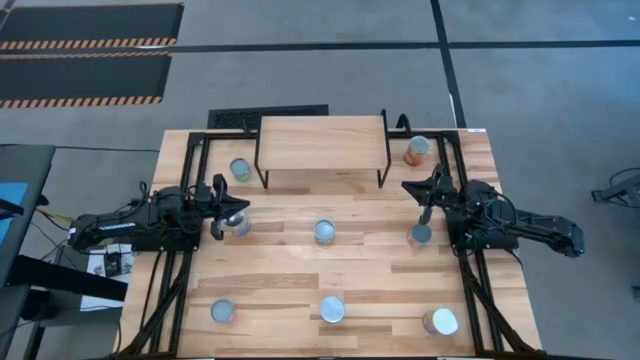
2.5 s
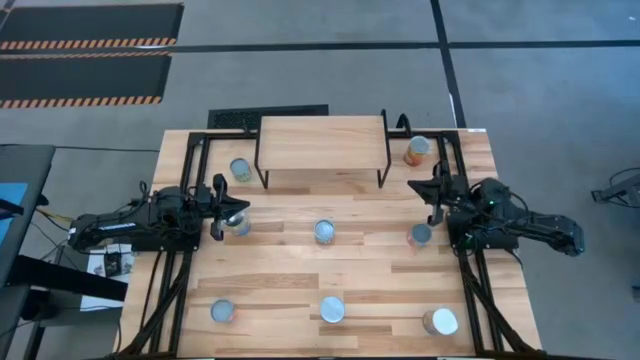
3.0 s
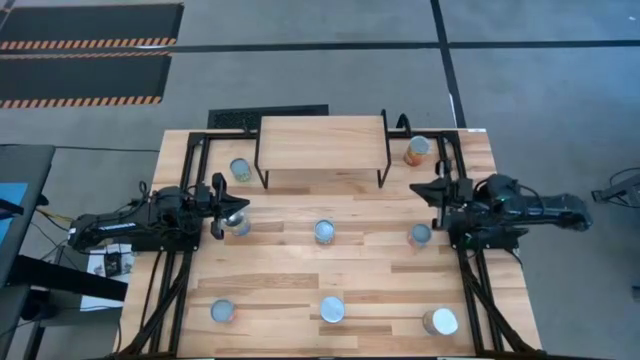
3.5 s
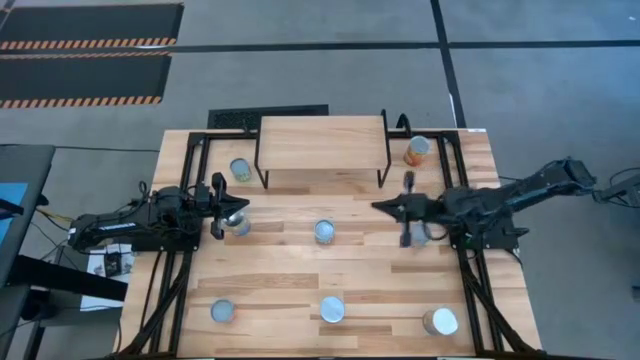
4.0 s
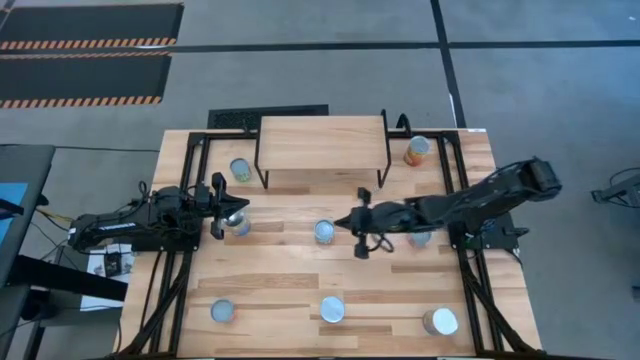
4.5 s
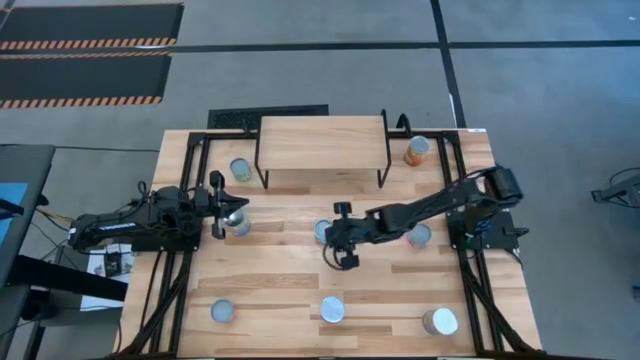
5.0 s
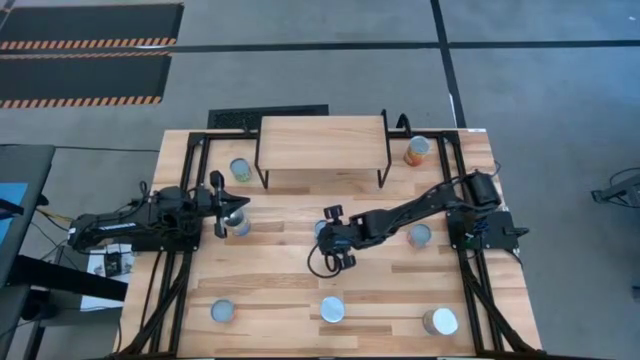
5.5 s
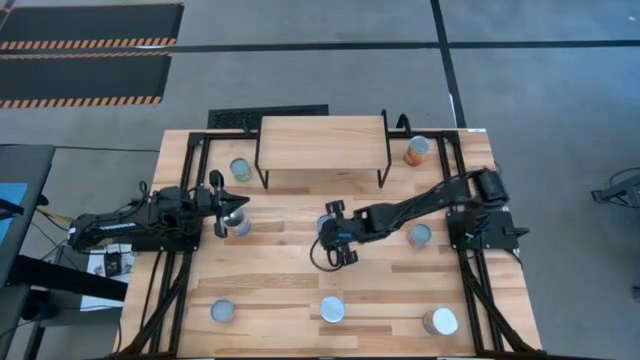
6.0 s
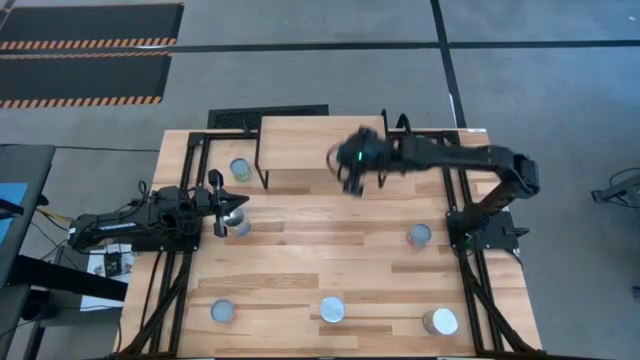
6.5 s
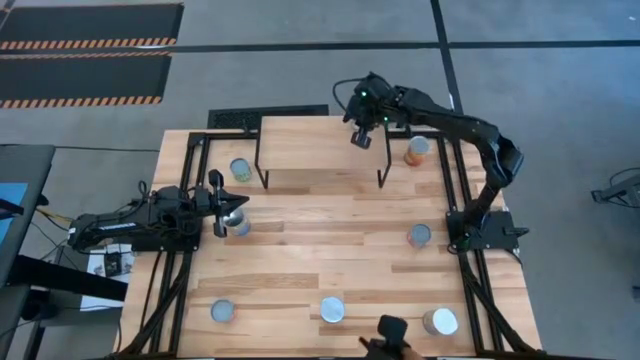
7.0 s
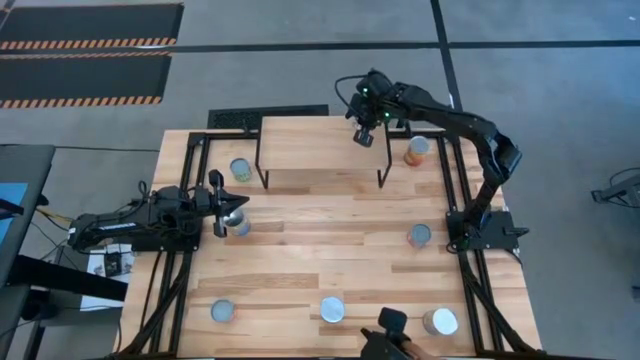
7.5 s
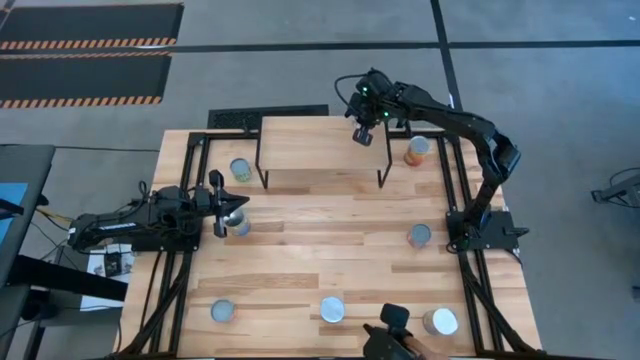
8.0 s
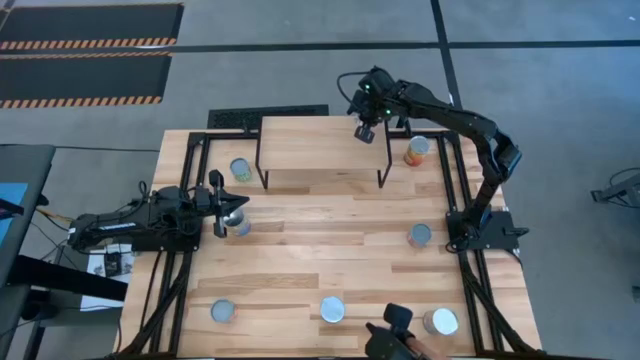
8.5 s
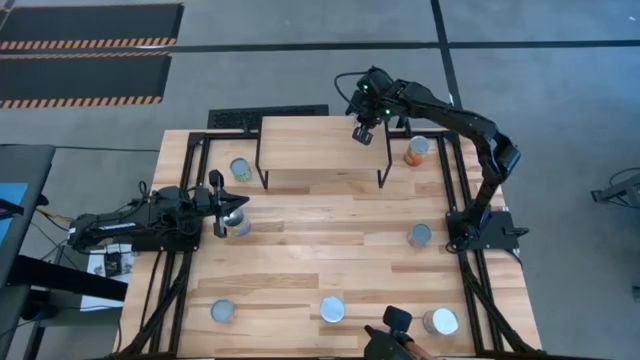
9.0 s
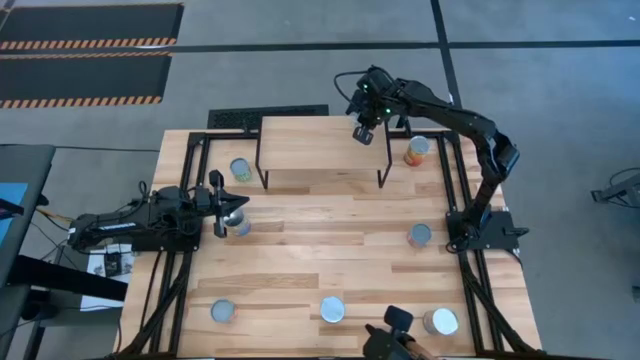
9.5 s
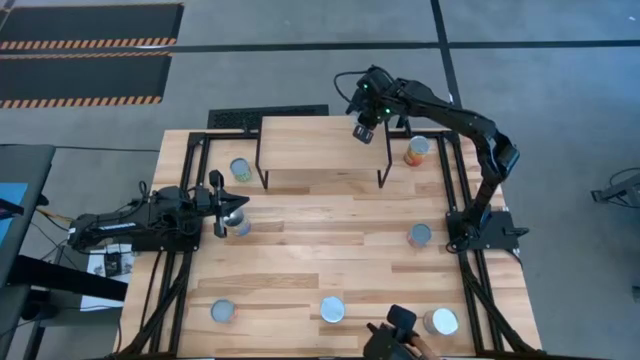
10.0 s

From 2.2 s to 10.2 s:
Task: Pick and place cans onto a shelf
Put the canned carrots on the shelf

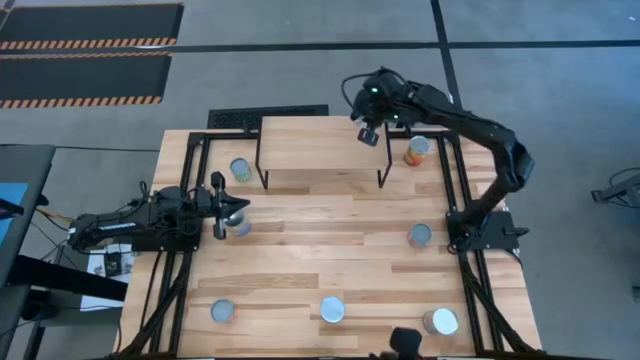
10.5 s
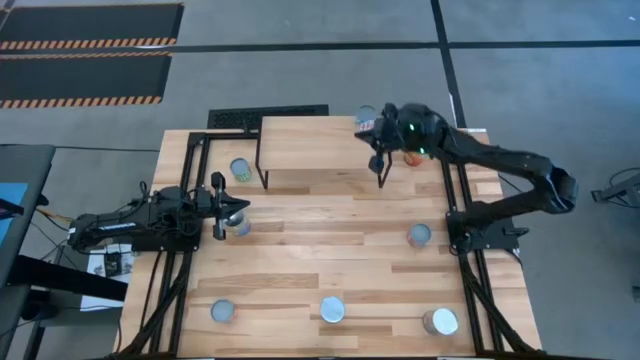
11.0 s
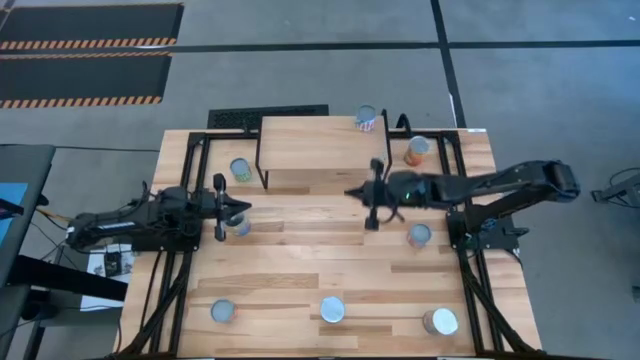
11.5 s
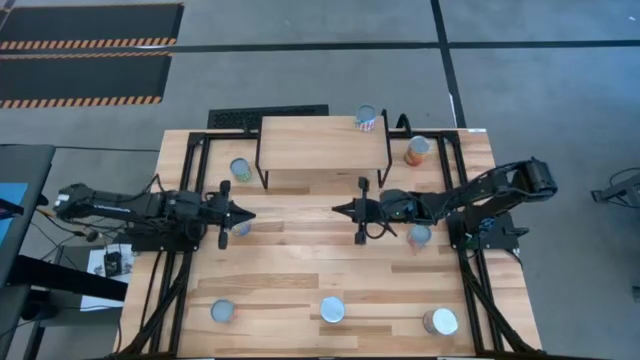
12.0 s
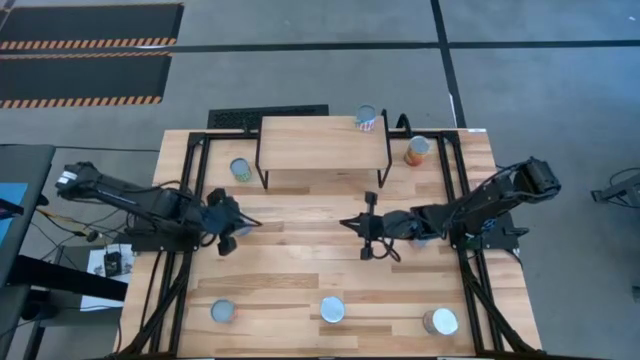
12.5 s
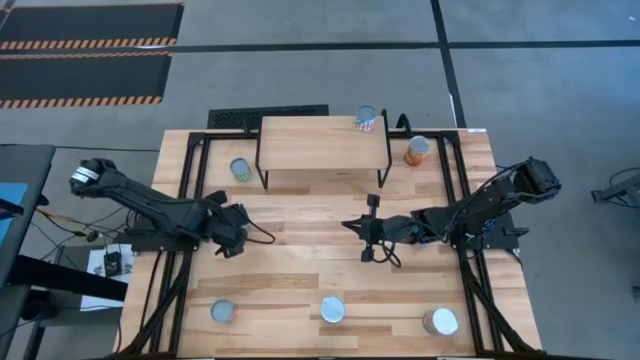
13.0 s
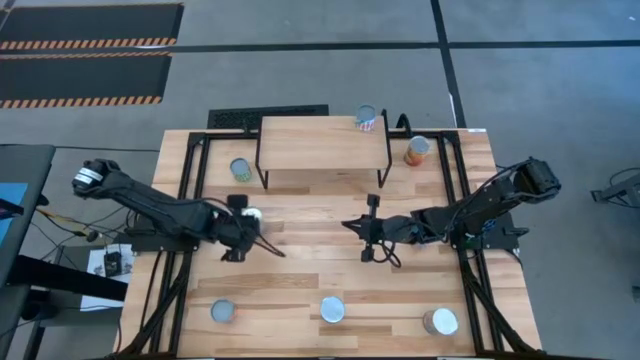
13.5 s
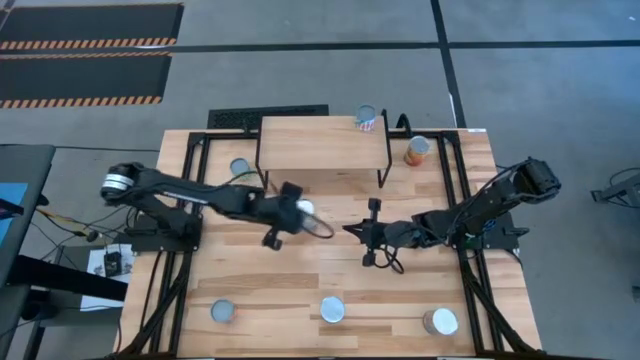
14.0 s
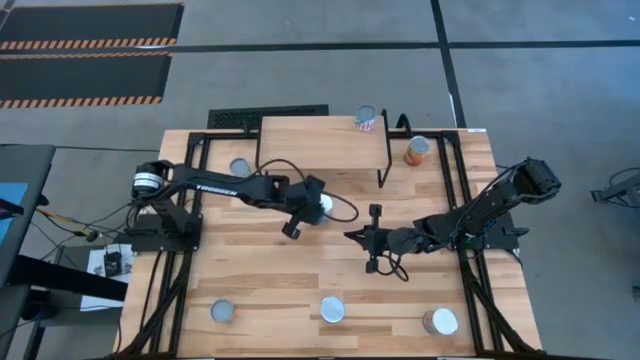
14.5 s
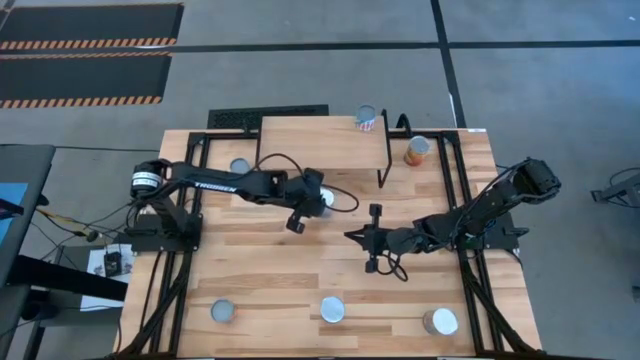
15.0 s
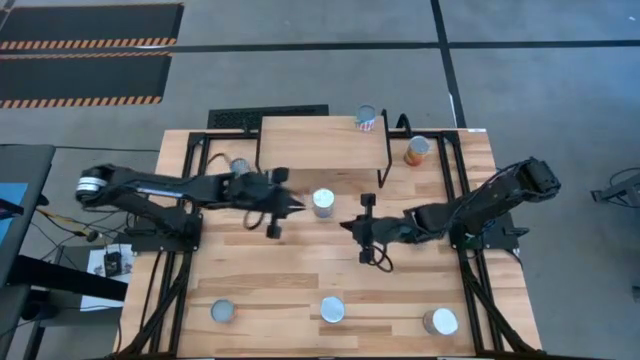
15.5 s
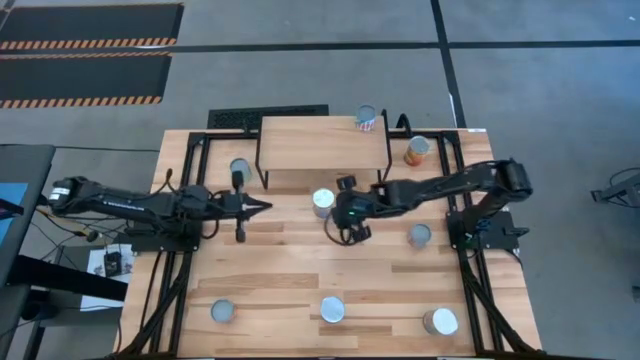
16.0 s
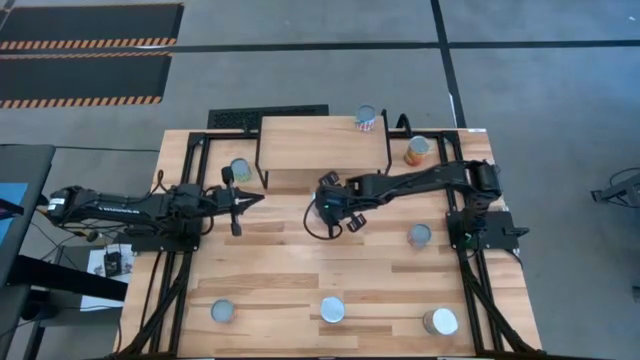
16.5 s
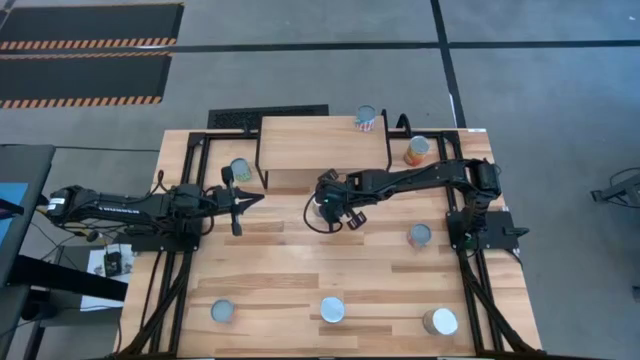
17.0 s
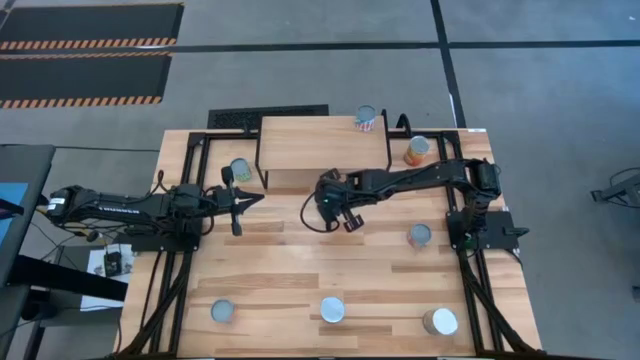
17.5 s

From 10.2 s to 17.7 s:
Put the top canned peaches on the shelf

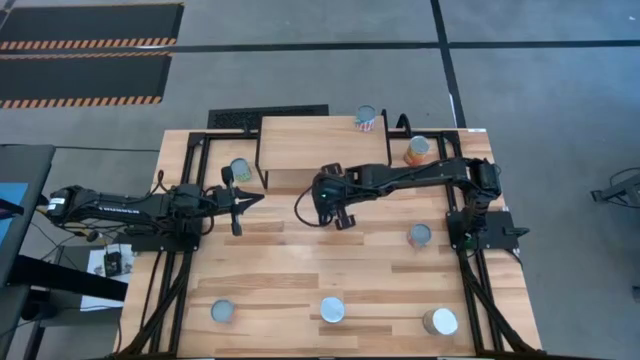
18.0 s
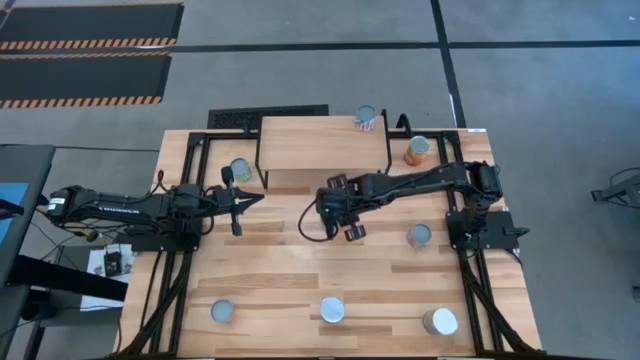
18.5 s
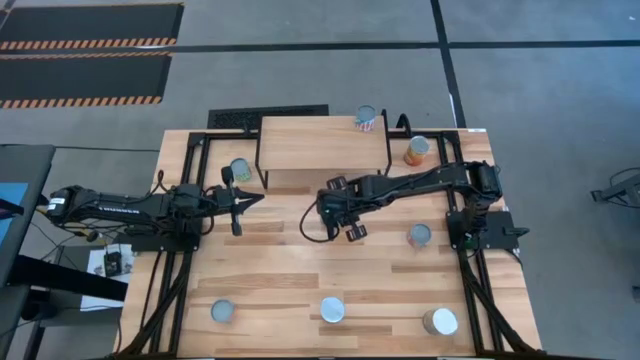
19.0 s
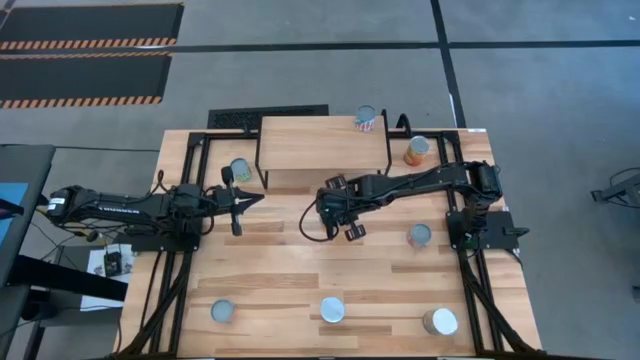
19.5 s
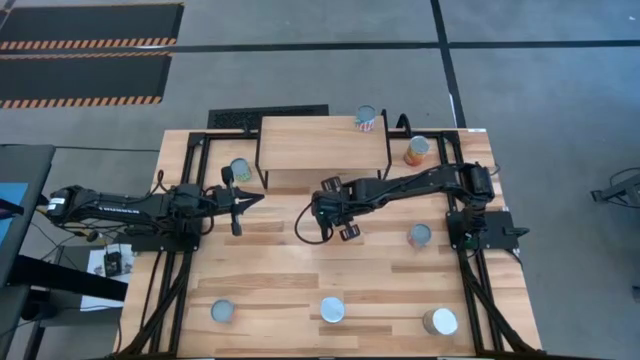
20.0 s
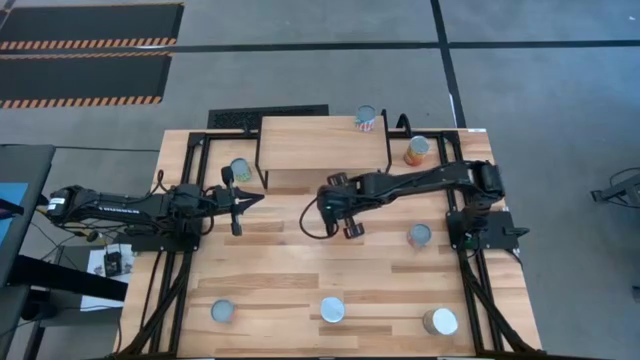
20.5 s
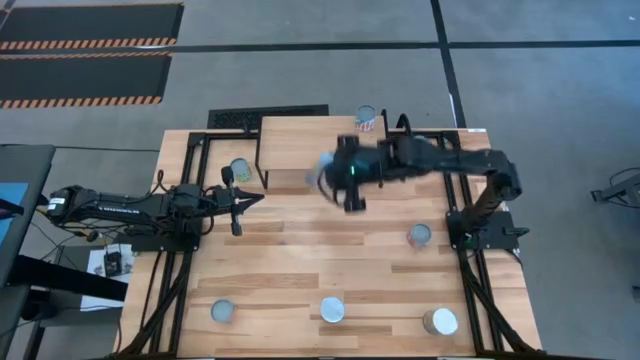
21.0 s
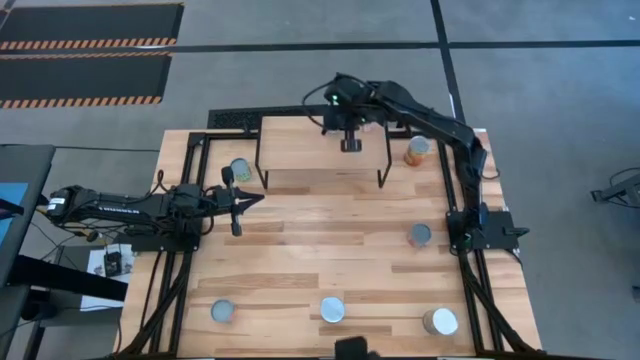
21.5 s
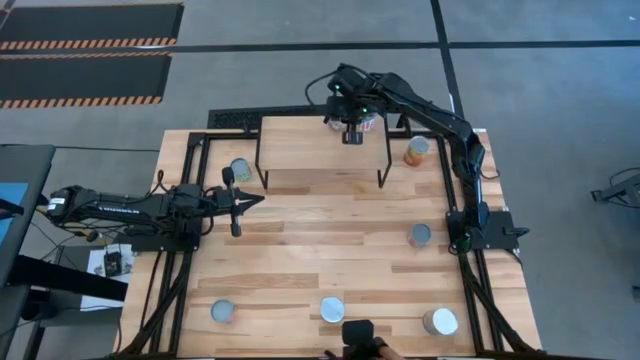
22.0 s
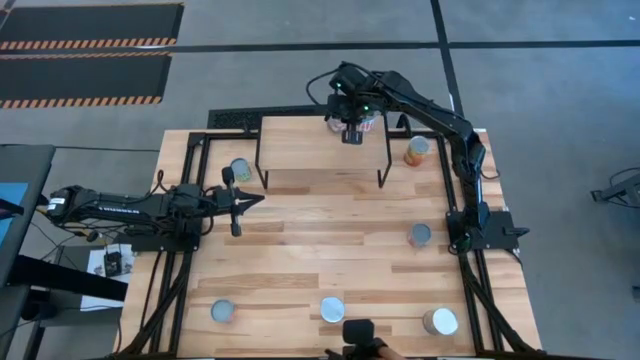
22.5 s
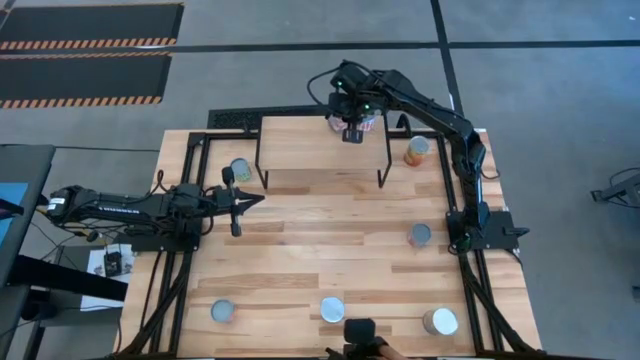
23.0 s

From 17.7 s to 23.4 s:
Put the top canned peaches on the shelf

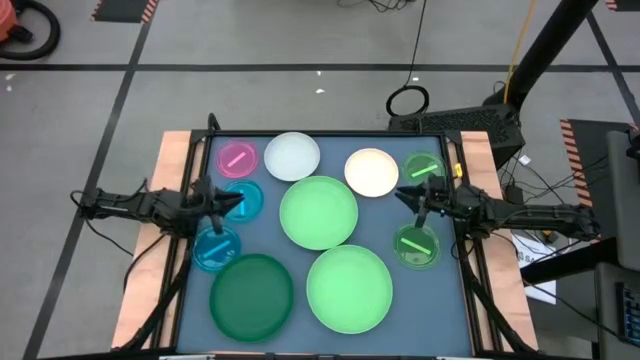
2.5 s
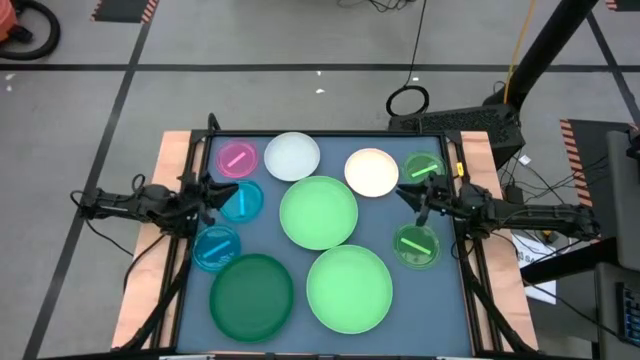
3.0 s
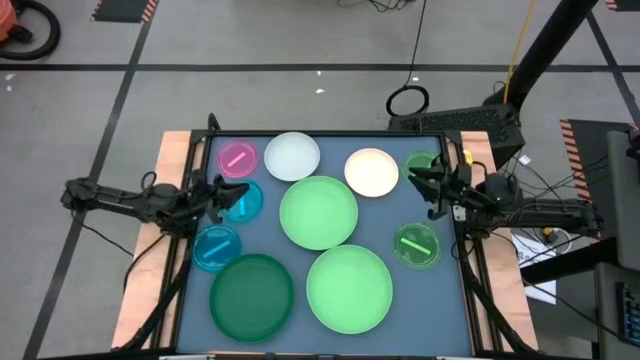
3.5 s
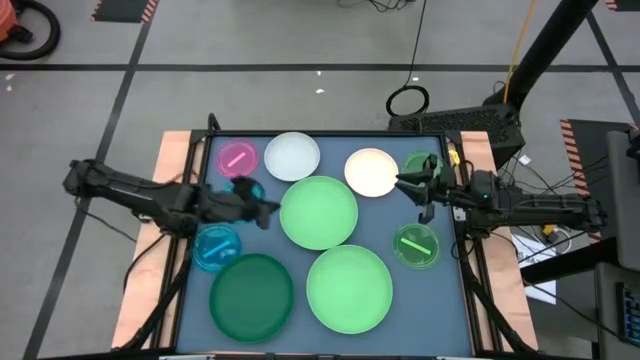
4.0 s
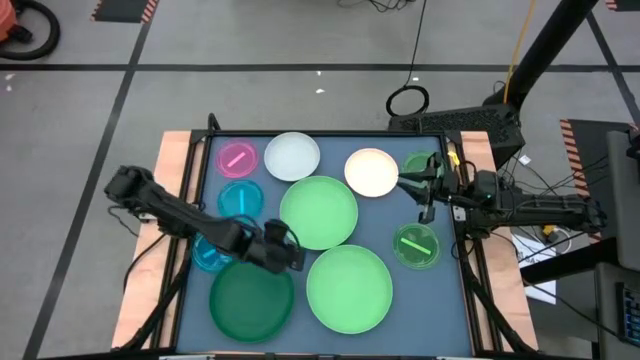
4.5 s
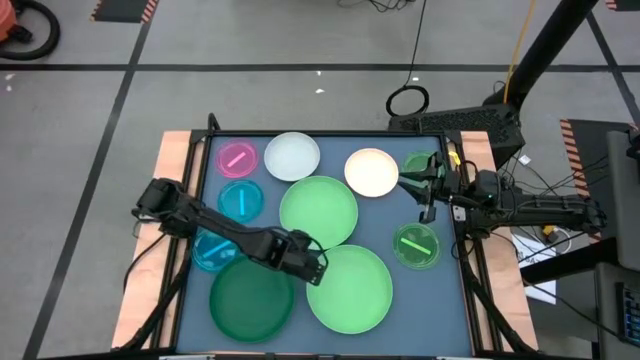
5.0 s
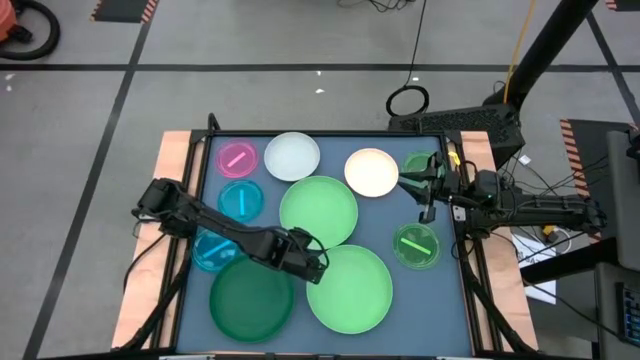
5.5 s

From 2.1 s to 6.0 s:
Task: Stack plastic plates
Stack the bottom light green plate on top of the top light green plate
